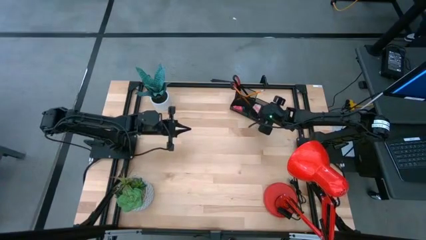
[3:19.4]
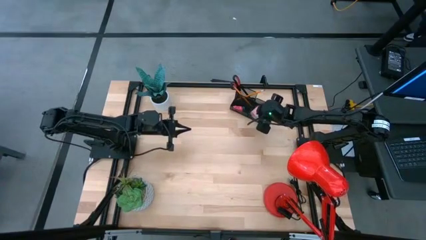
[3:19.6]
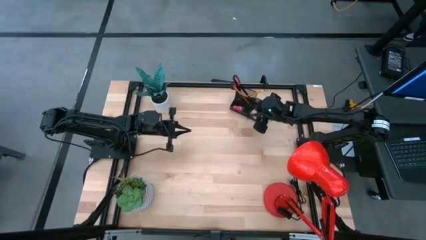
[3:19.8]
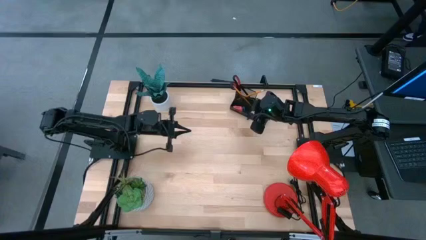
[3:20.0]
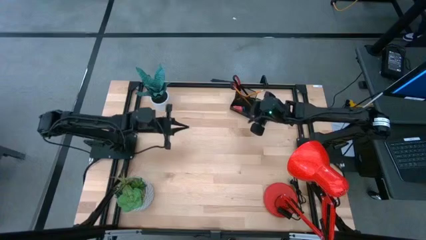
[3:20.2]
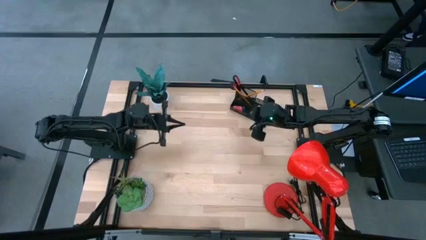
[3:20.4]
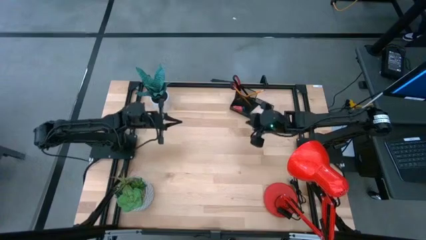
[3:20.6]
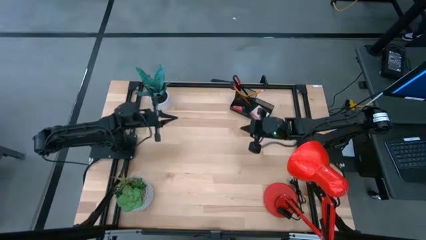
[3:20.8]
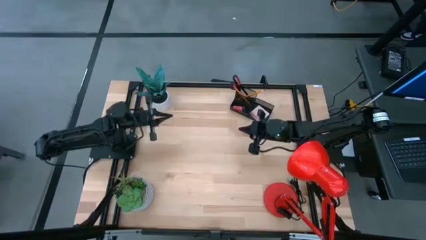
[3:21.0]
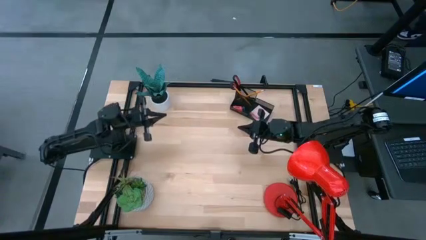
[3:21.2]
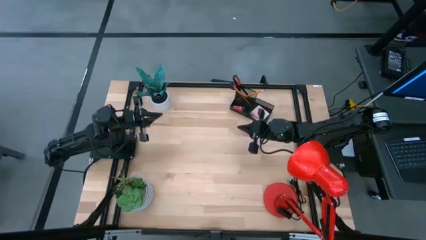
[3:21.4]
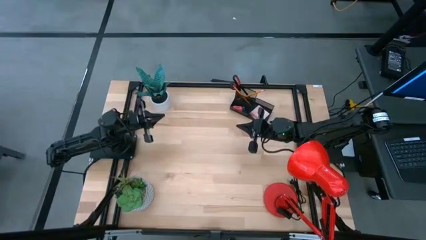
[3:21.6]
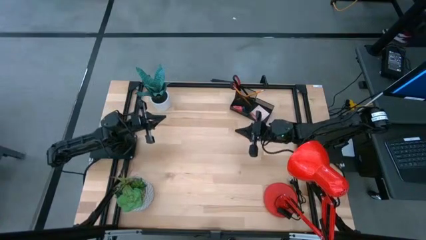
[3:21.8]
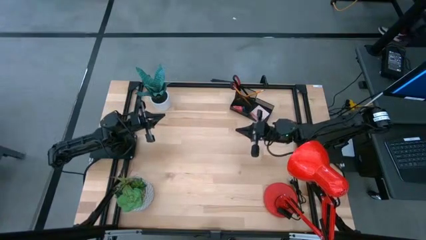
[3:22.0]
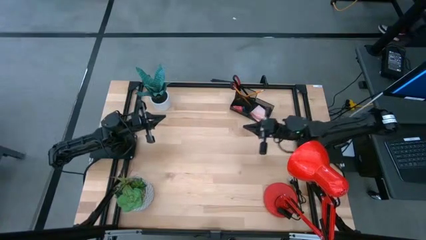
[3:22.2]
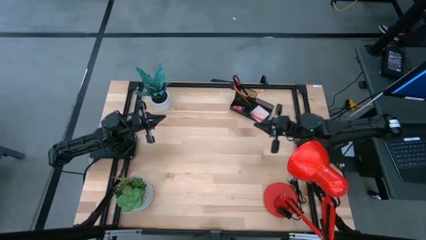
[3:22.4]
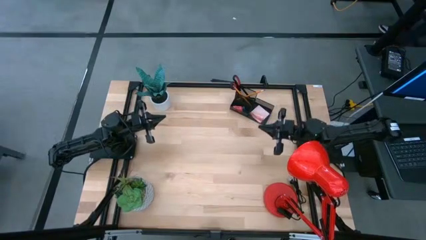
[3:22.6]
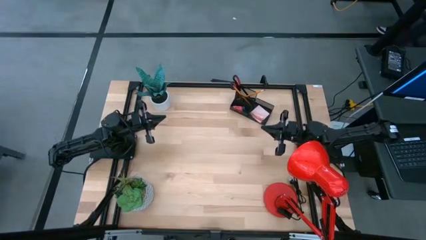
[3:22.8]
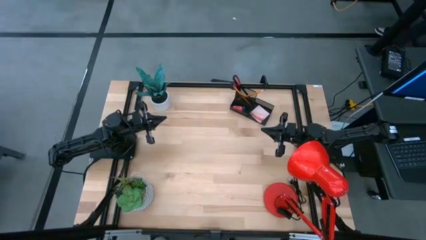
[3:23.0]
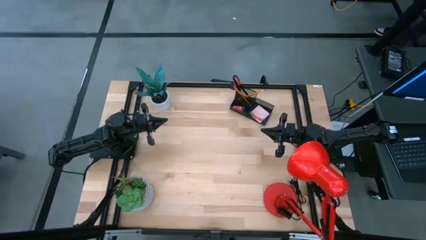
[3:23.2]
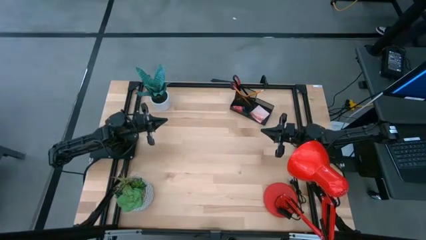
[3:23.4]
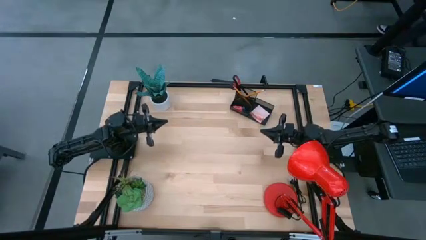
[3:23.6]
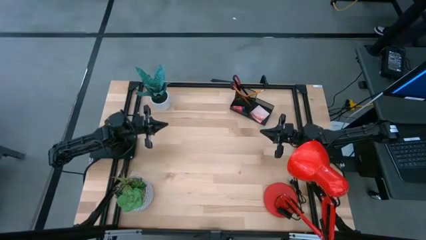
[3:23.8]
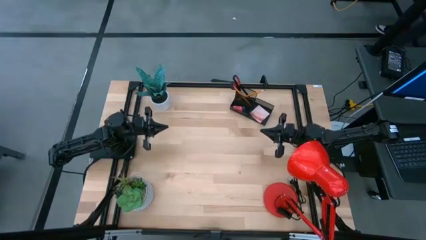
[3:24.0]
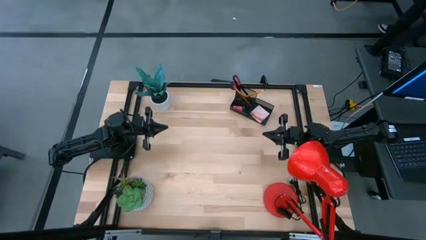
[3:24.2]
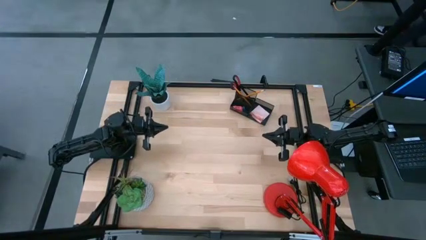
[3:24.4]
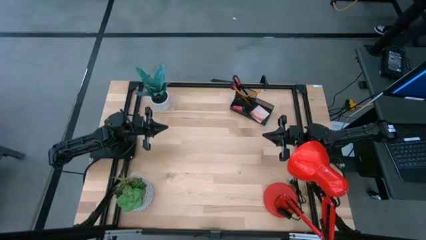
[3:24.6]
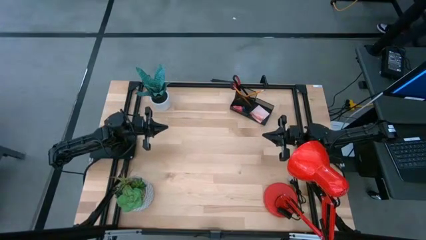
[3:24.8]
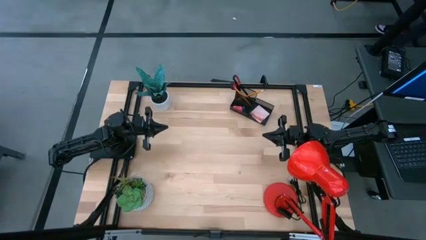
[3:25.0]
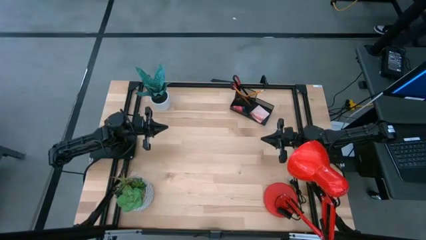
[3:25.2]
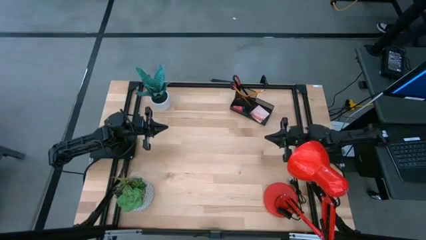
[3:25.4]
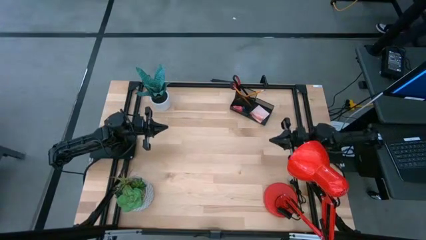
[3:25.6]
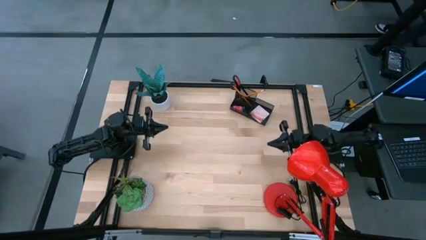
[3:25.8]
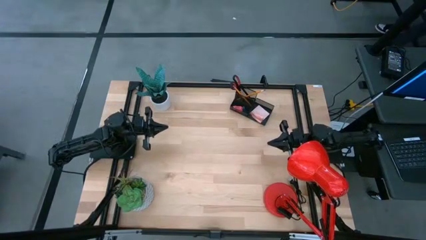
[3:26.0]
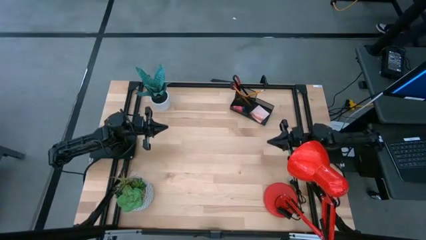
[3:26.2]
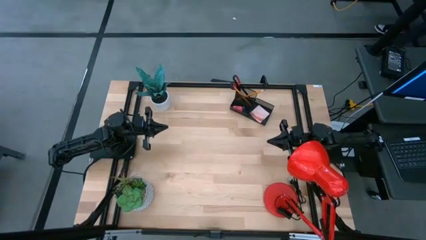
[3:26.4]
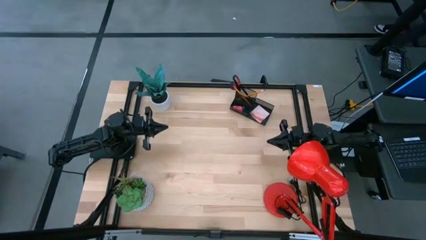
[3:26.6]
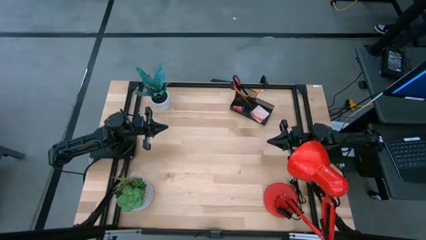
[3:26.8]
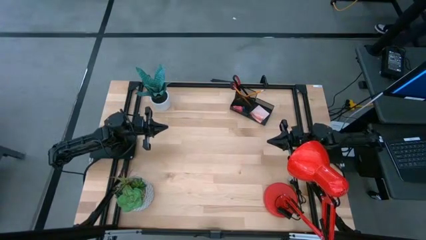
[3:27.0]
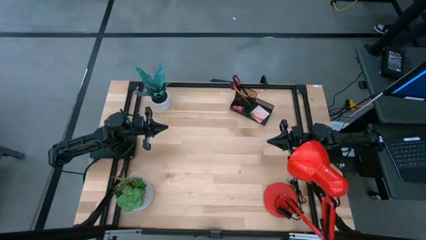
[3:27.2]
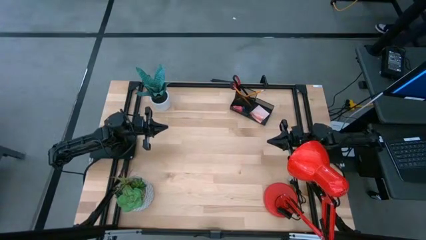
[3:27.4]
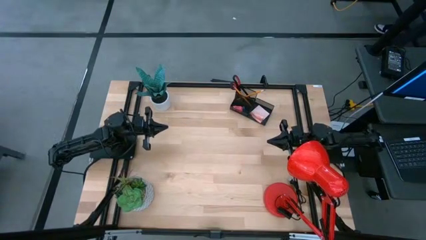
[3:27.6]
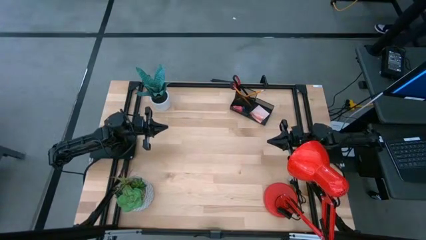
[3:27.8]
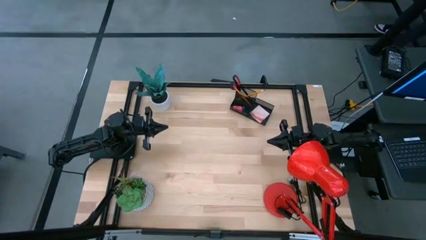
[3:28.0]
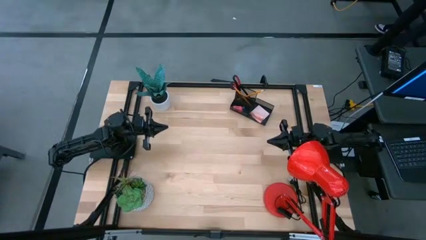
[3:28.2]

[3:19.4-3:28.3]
Task: Pick and place office supplies into organizer
Return to Home Position
